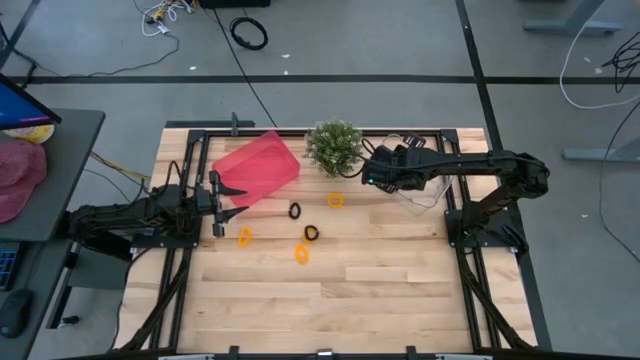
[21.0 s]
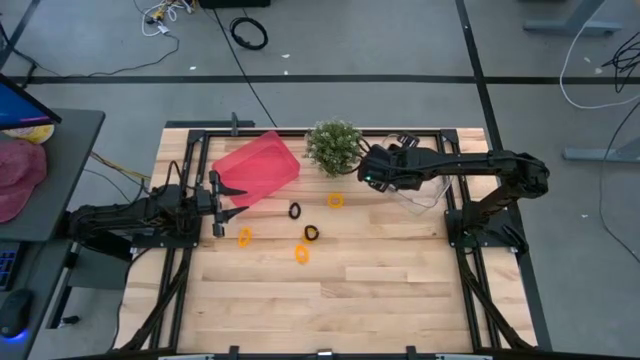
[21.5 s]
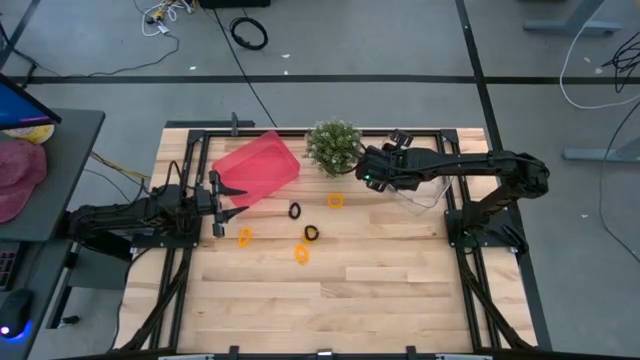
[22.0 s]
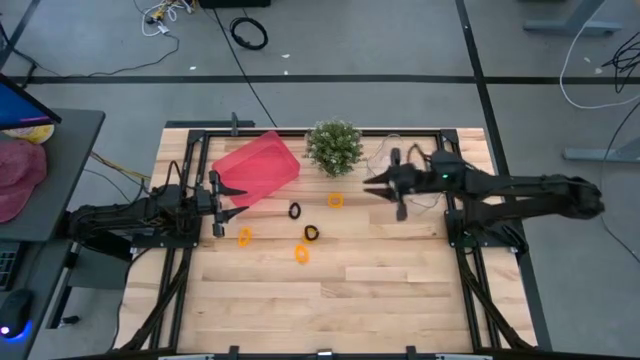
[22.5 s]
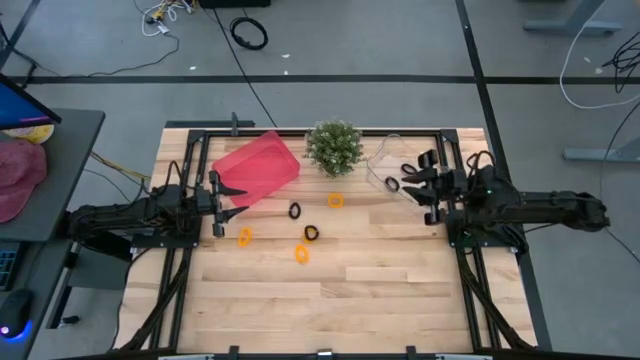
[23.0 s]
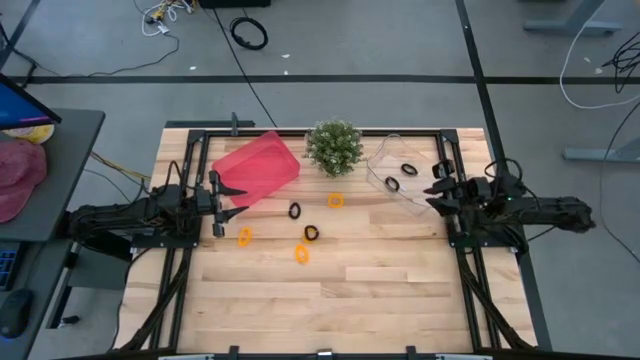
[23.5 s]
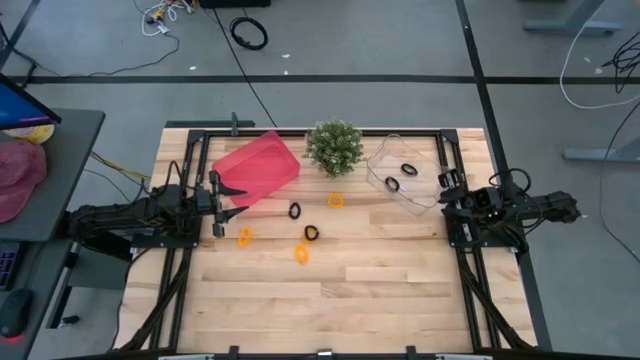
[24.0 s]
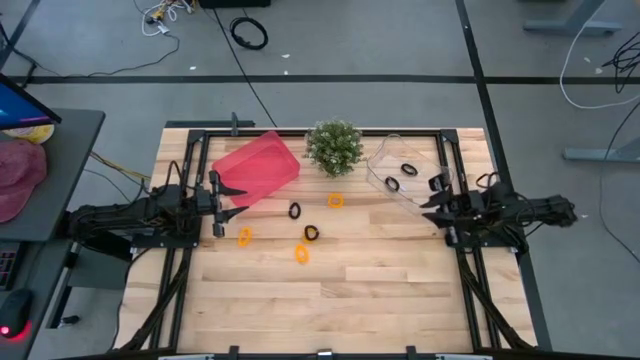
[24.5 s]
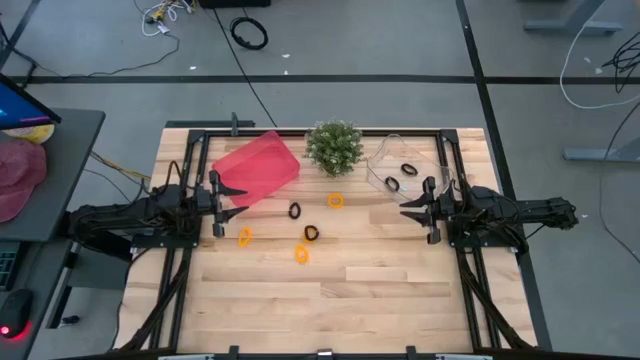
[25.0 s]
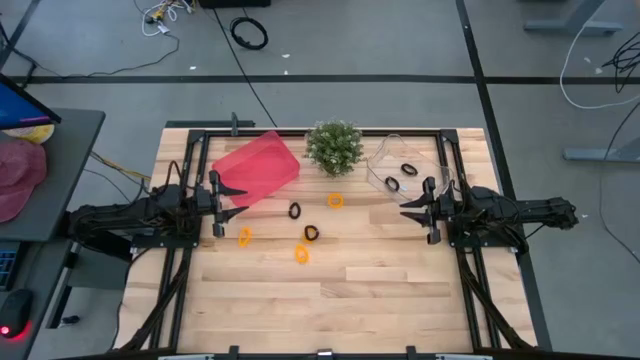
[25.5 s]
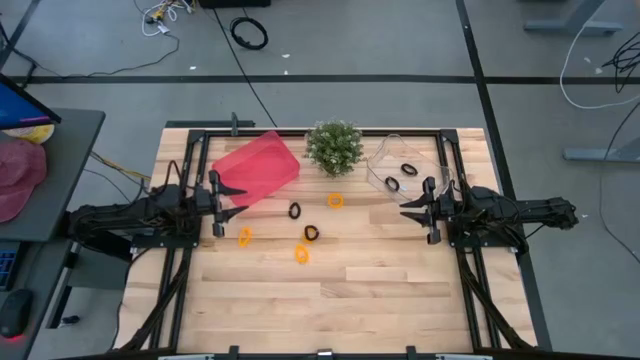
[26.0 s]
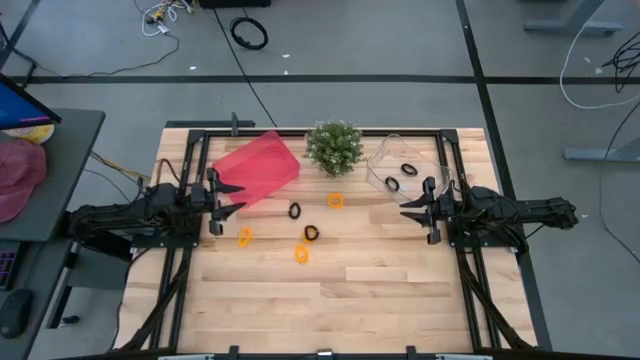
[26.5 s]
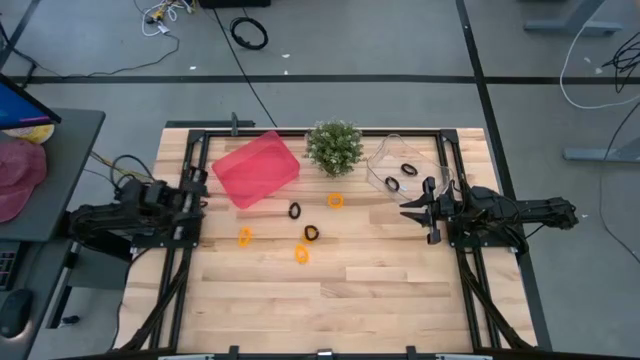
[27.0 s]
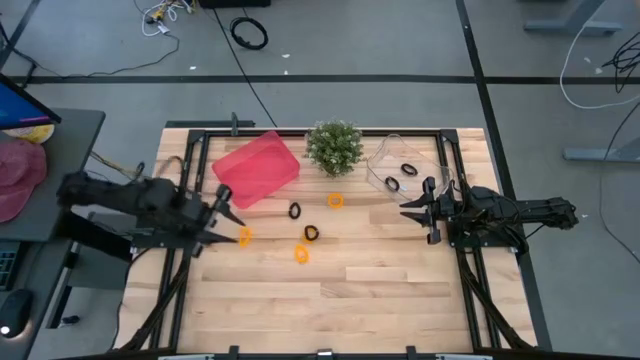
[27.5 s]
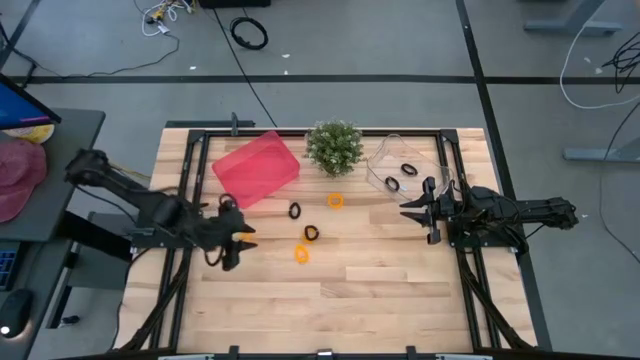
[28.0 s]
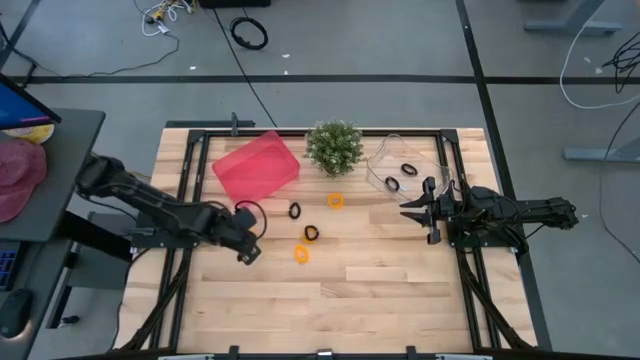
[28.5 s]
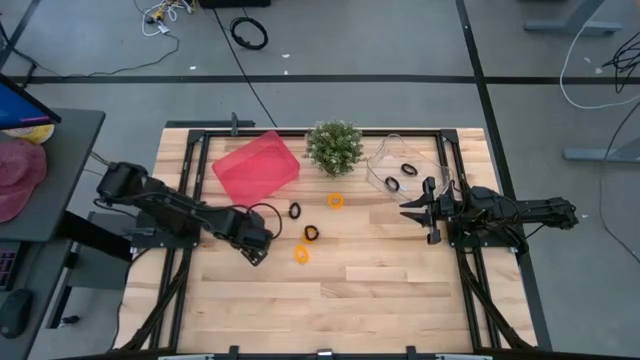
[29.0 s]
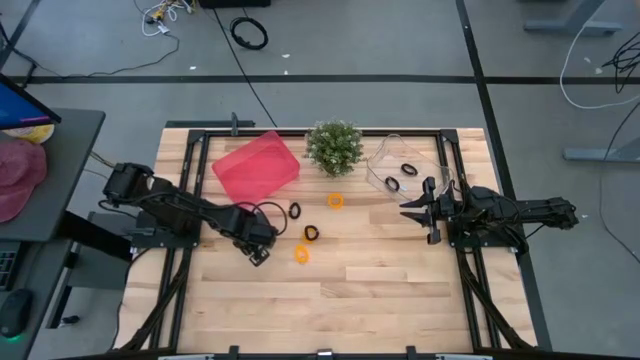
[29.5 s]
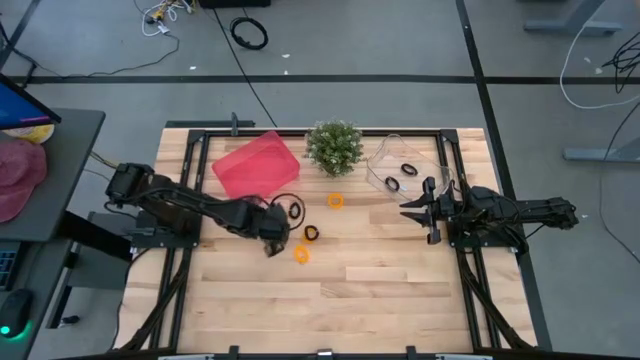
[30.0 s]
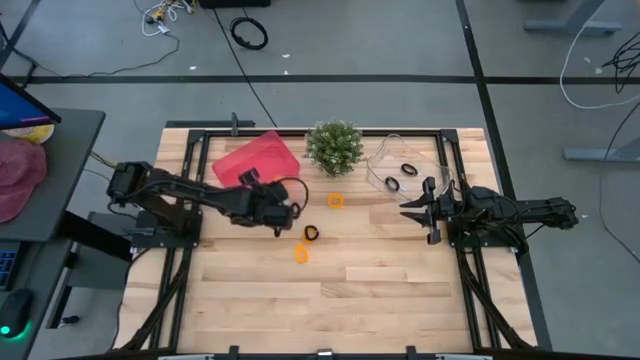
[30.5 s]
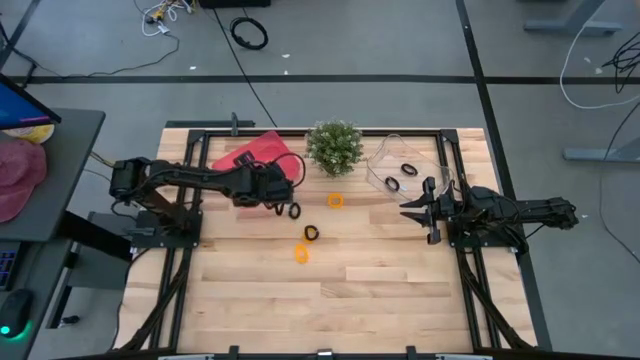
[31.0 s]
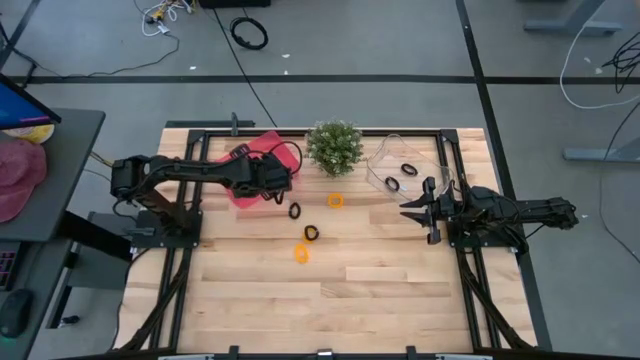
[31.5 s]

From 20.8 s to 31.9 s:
Task: Sort spring keychains
Put the yellow spring keychain into the pink bin

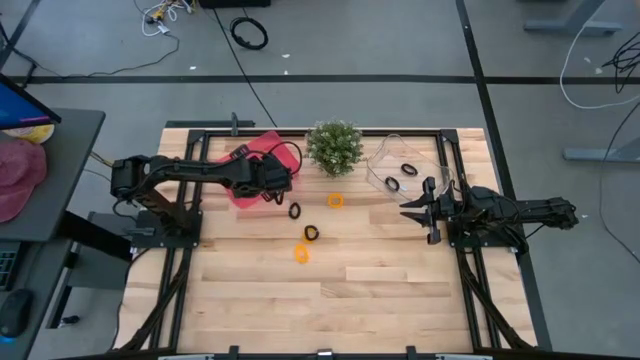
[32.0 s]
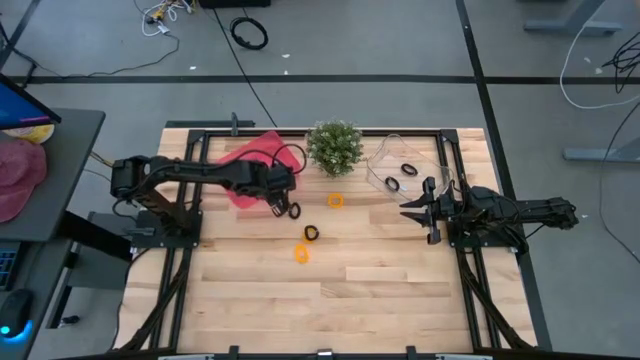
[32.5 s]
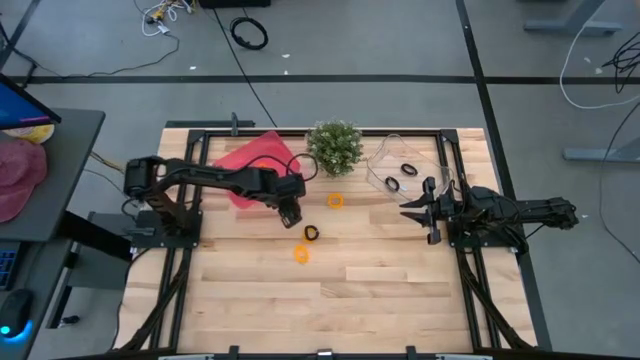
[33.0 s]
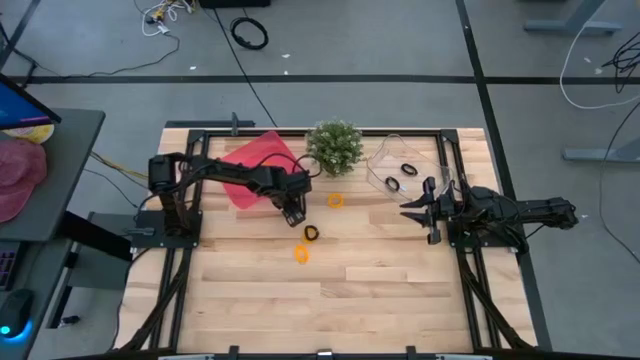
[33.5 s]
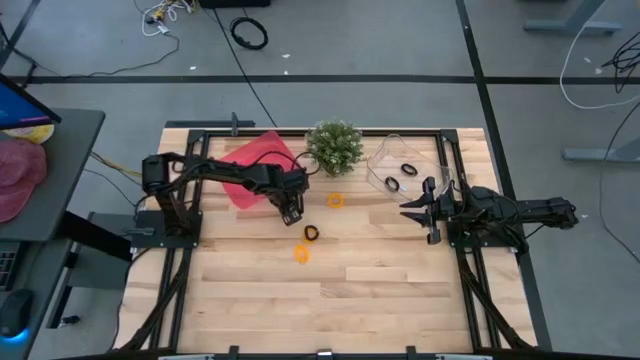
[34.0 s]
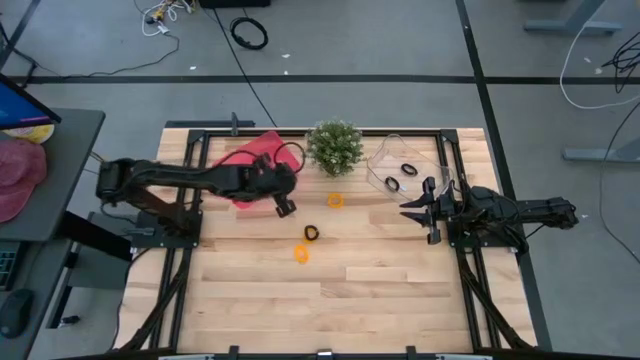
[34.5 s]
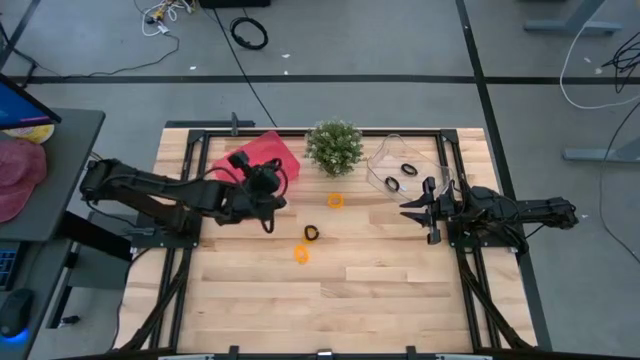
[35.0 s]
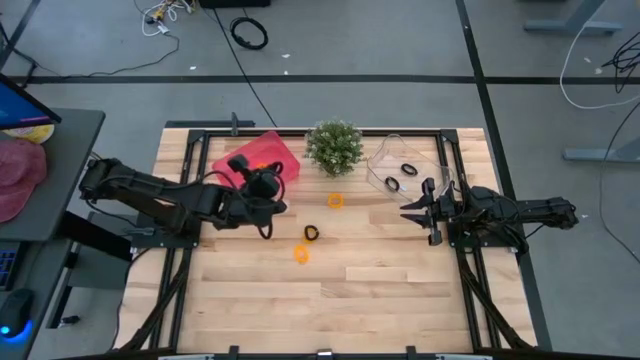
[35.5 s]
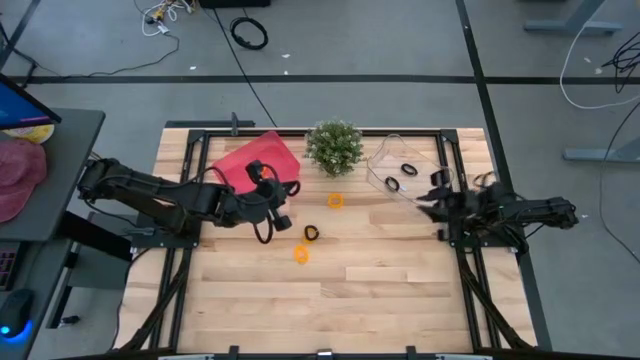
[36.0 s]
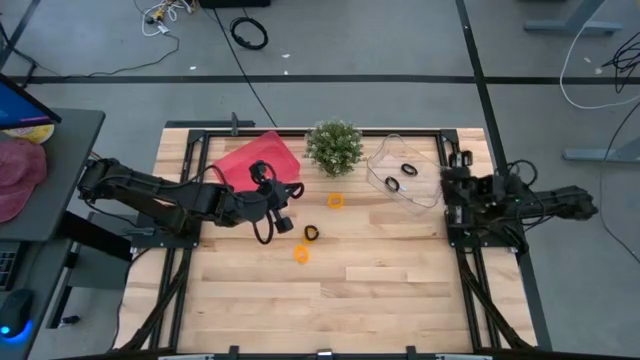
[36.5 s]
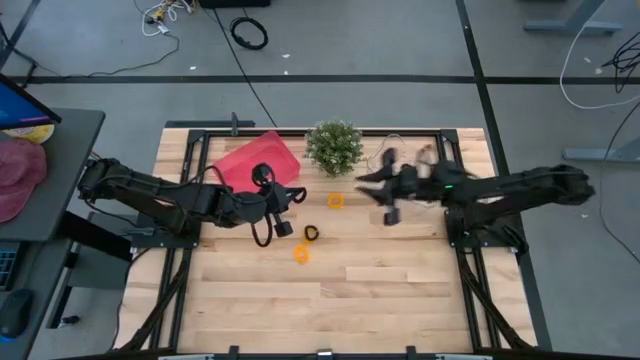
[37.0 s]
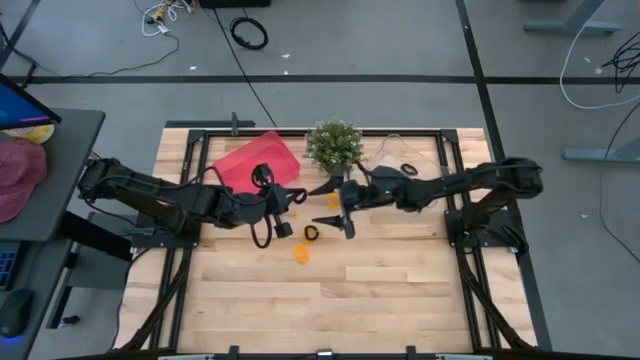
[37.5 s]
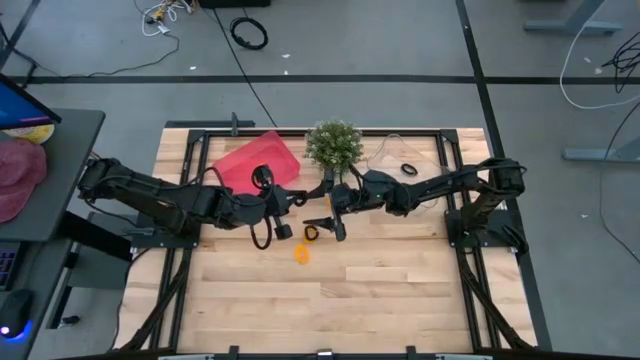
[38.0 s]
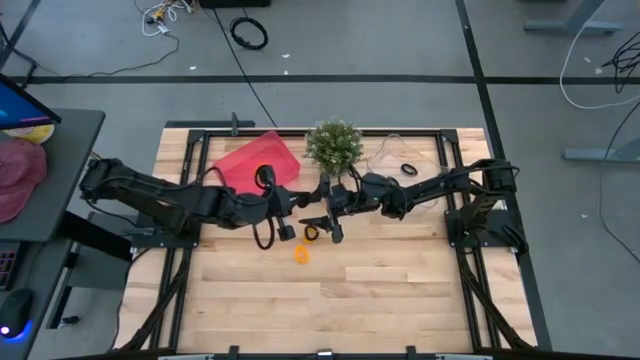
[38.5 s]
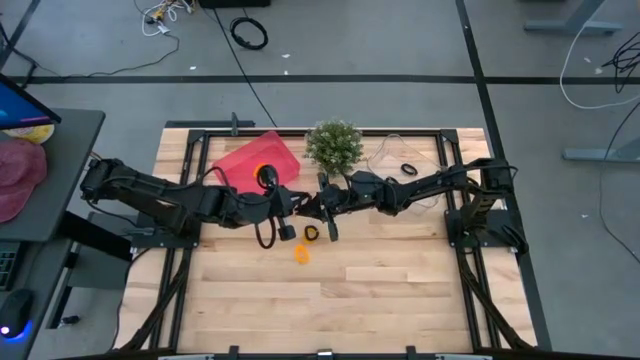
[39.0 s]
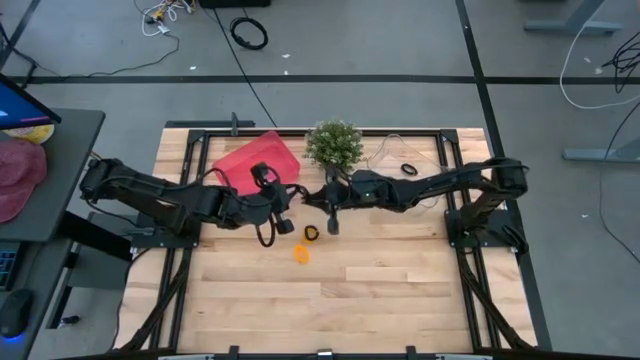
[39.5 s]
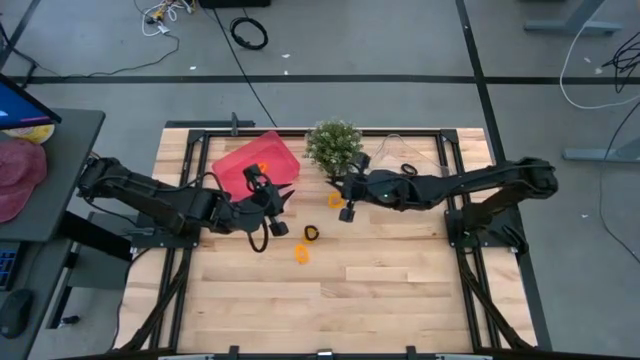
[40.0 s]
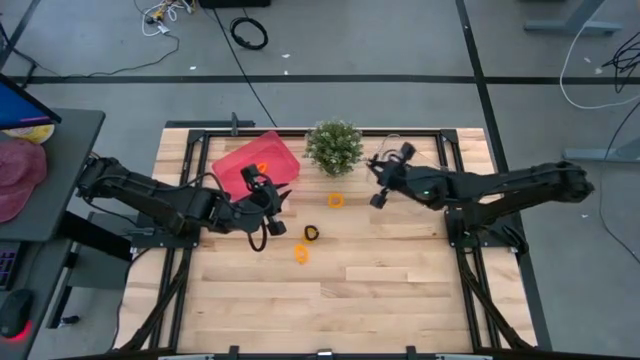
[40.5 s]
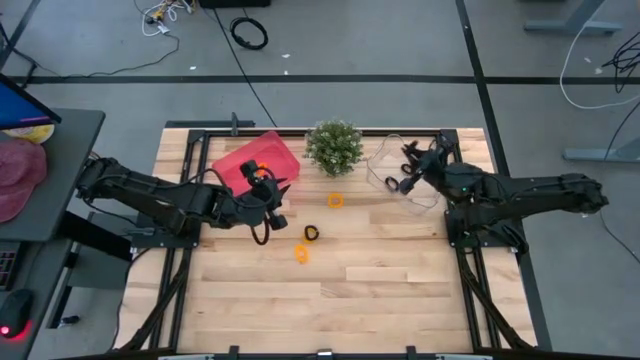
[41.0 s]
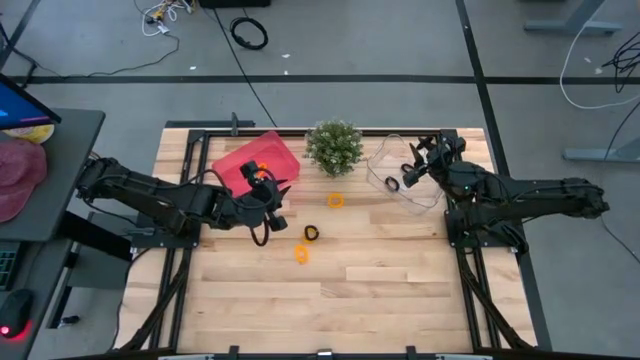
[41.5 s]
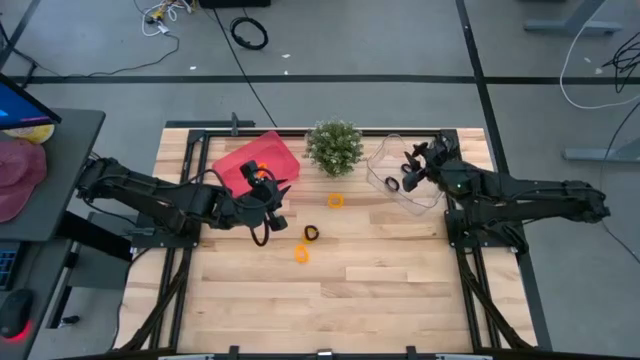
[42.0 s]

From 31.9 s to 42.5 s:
Put the black spring keychain into the transparent bin

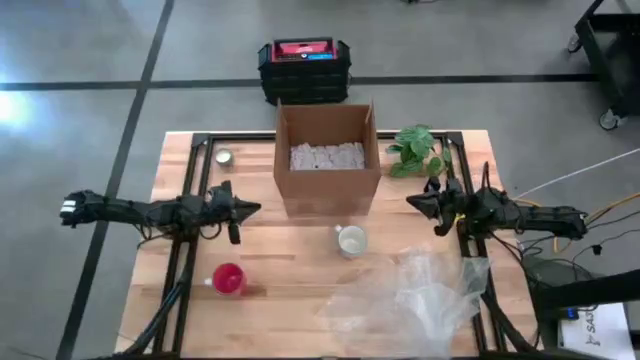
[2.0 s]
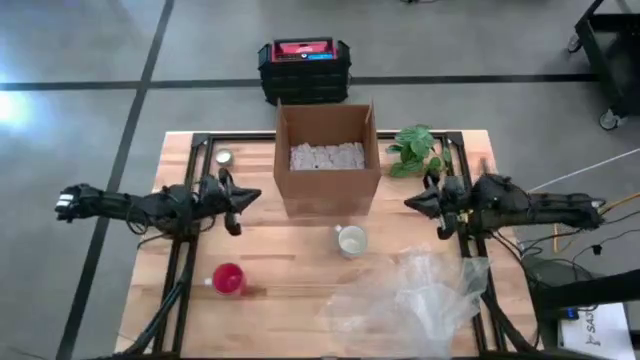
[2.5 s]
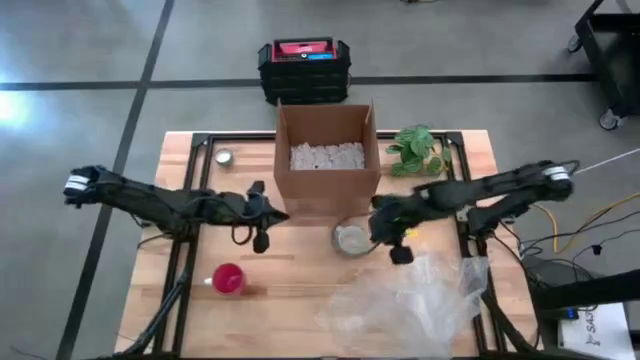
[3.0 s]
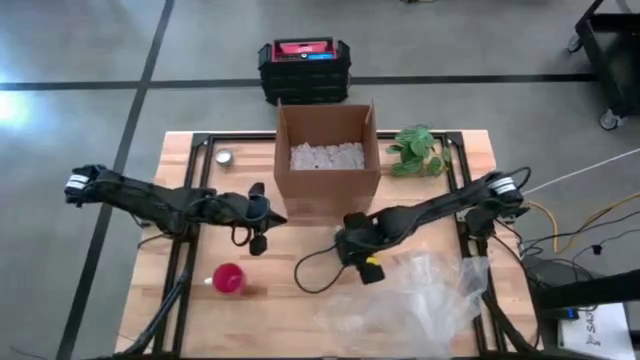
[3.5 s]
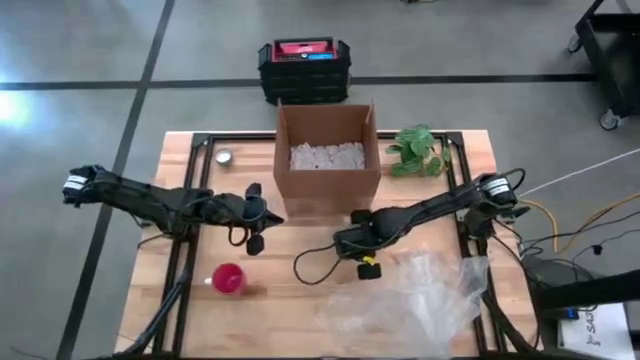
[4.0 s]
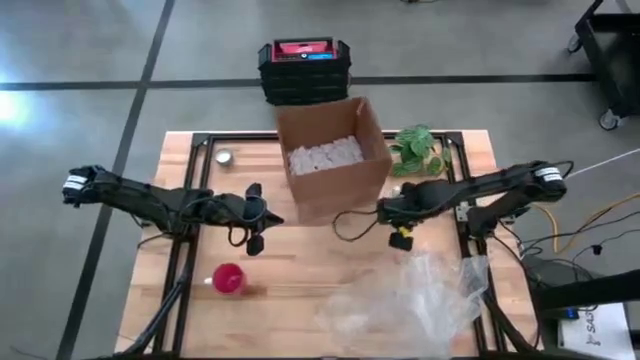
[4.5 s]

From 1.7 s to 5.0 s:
Task: wrap mug
Move the white mug to the top right of the table
